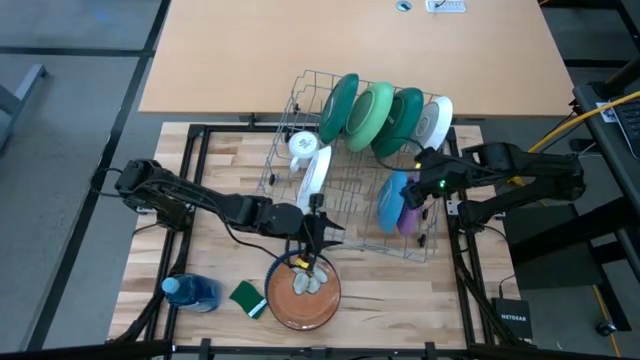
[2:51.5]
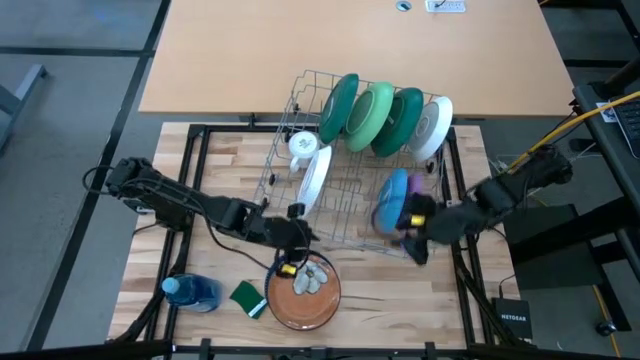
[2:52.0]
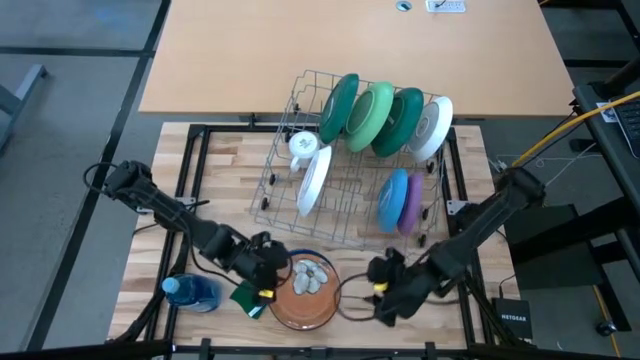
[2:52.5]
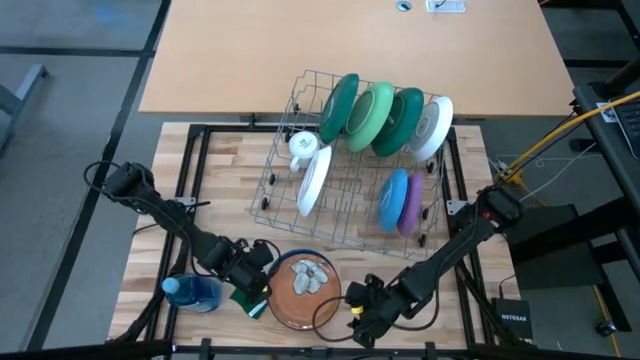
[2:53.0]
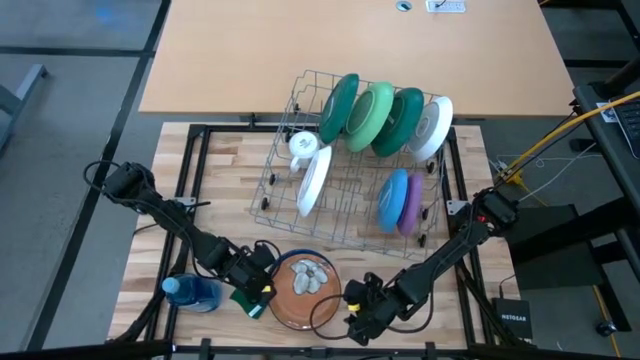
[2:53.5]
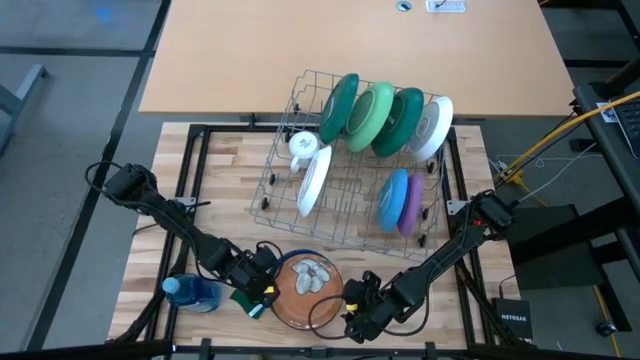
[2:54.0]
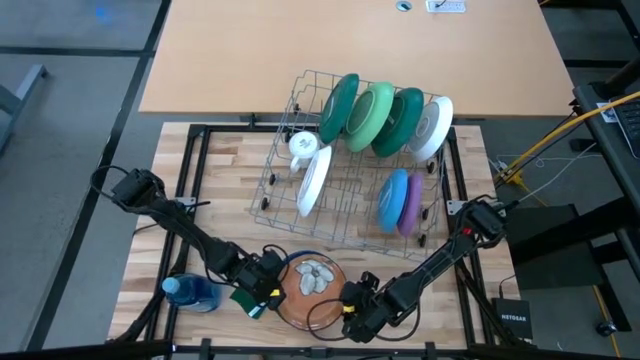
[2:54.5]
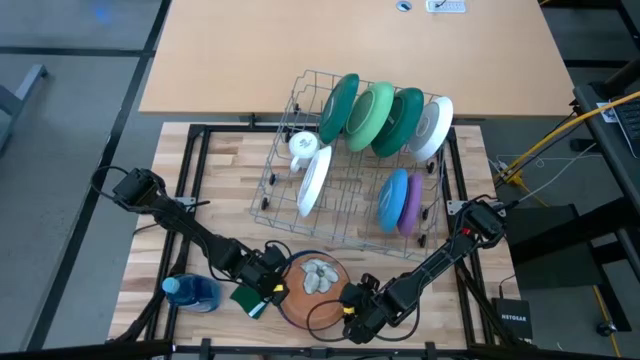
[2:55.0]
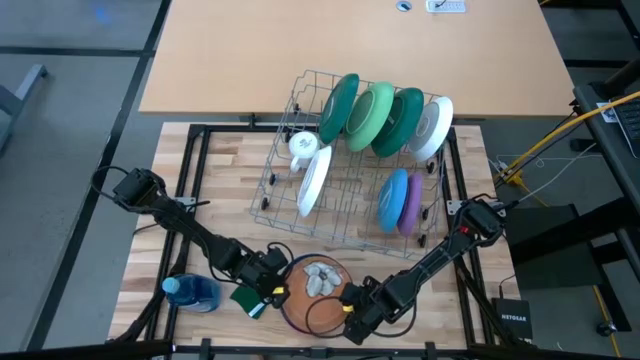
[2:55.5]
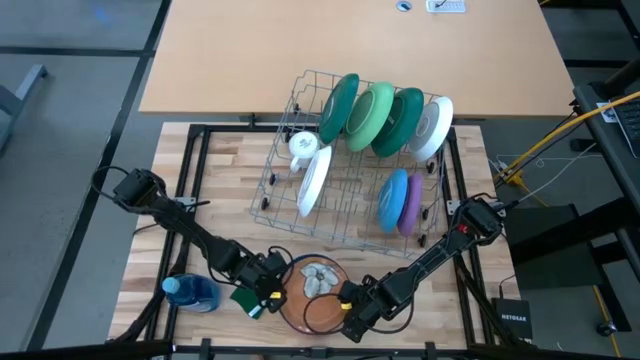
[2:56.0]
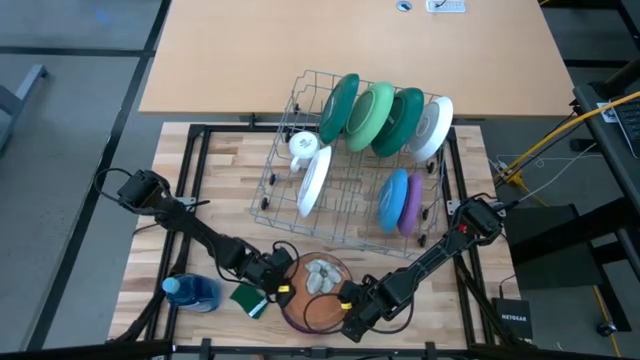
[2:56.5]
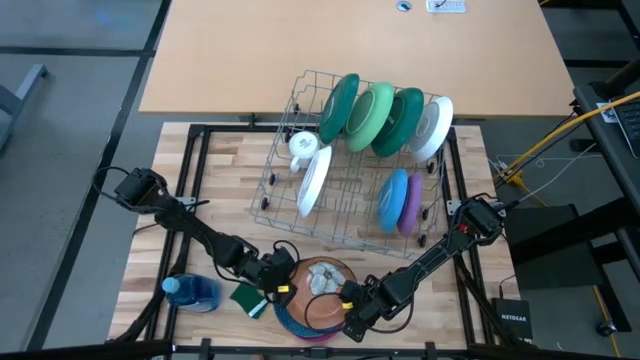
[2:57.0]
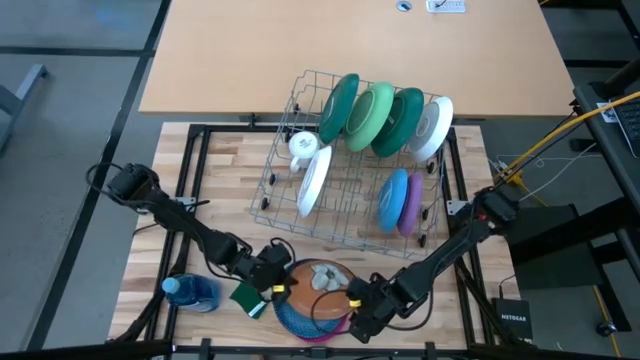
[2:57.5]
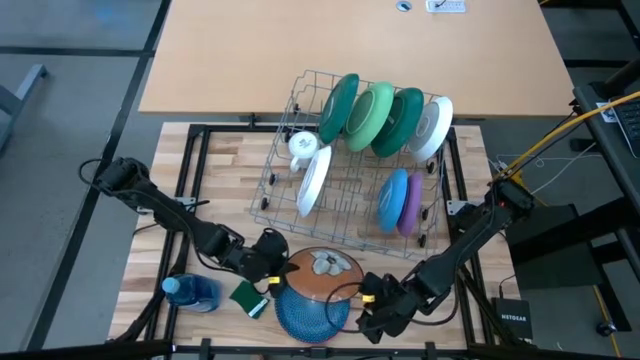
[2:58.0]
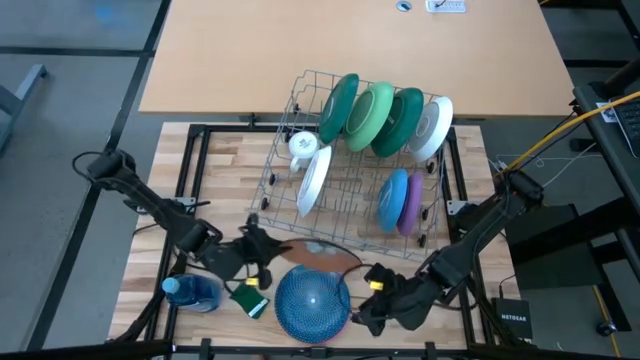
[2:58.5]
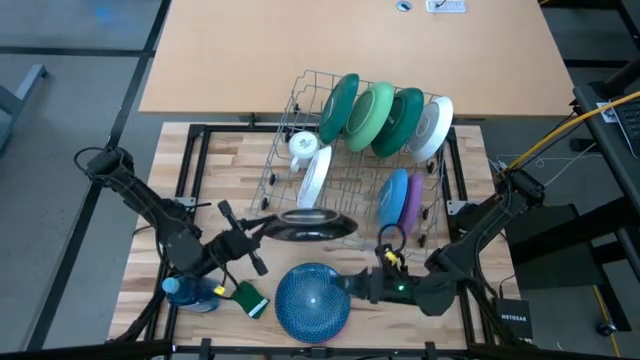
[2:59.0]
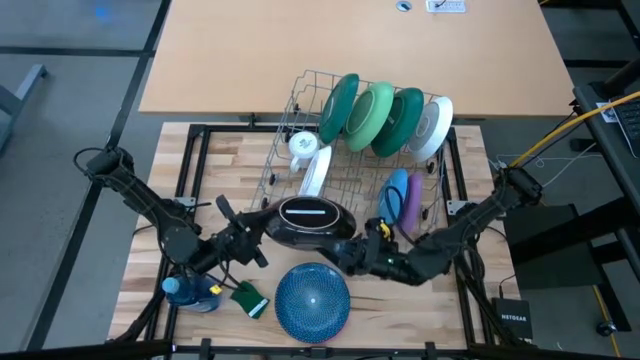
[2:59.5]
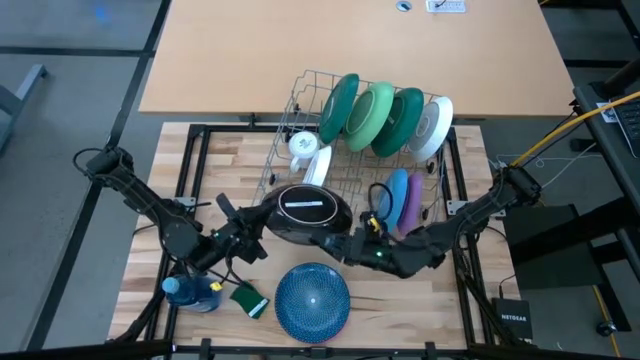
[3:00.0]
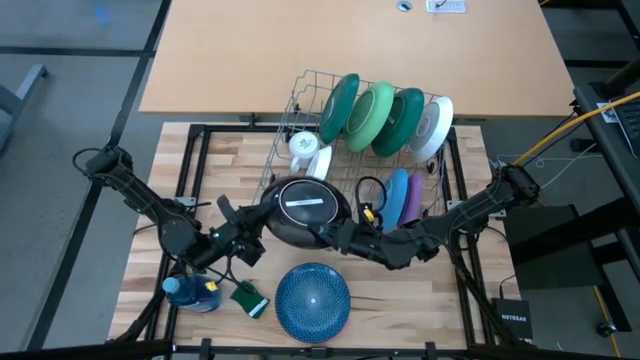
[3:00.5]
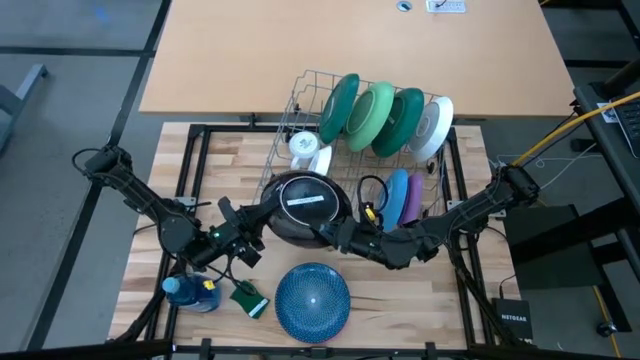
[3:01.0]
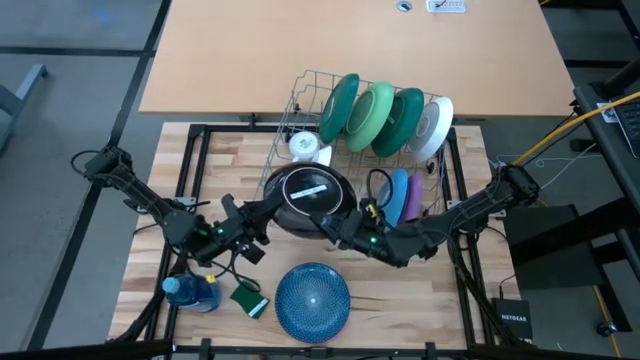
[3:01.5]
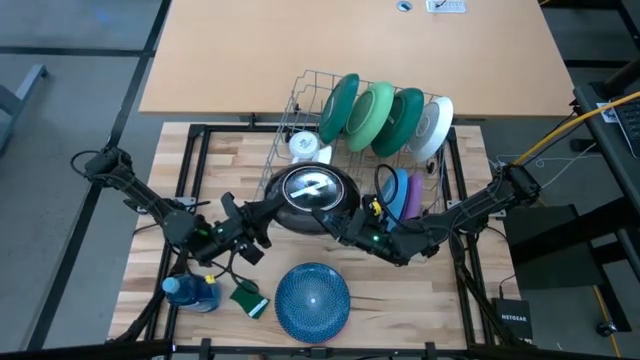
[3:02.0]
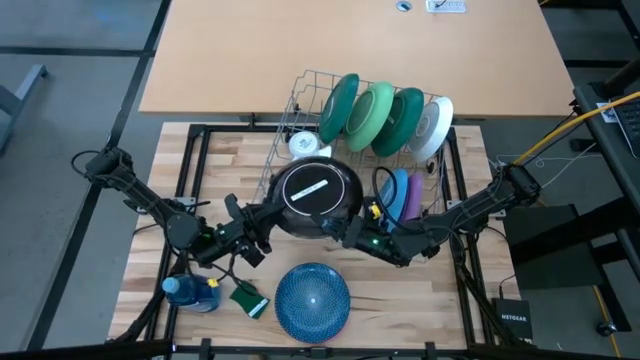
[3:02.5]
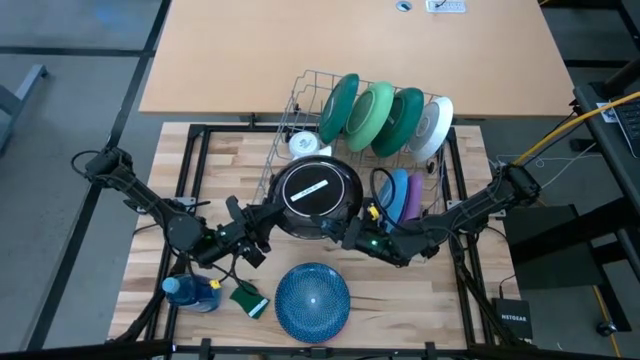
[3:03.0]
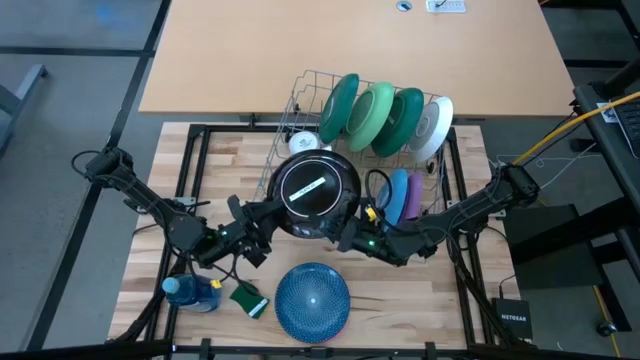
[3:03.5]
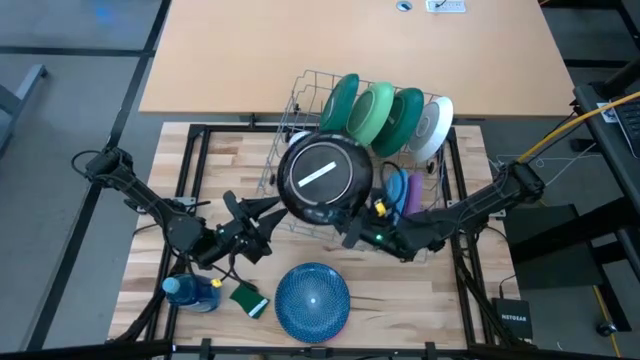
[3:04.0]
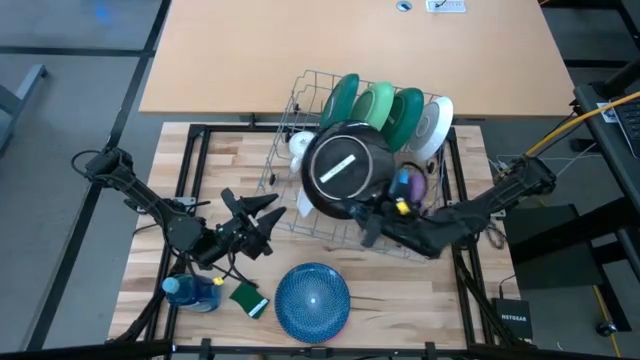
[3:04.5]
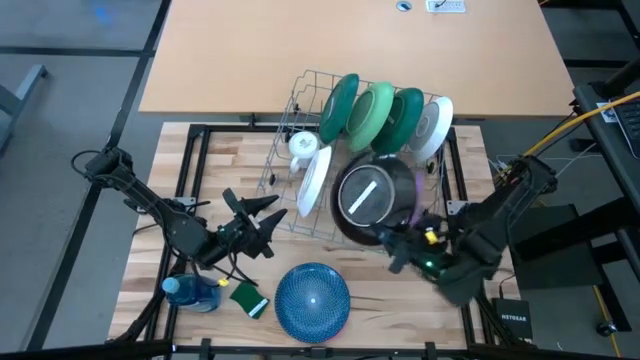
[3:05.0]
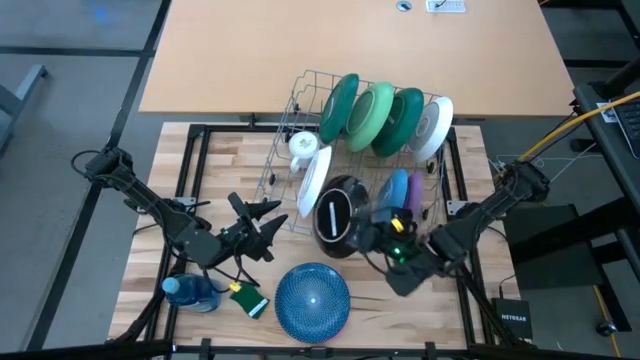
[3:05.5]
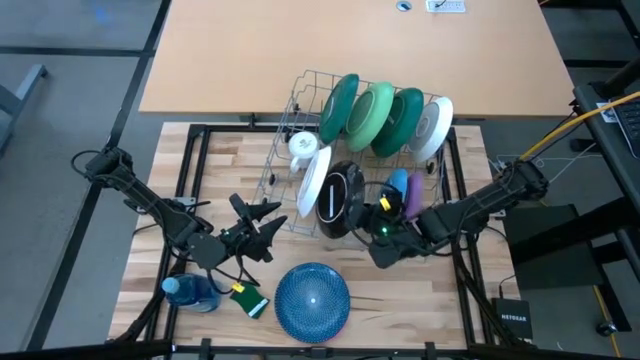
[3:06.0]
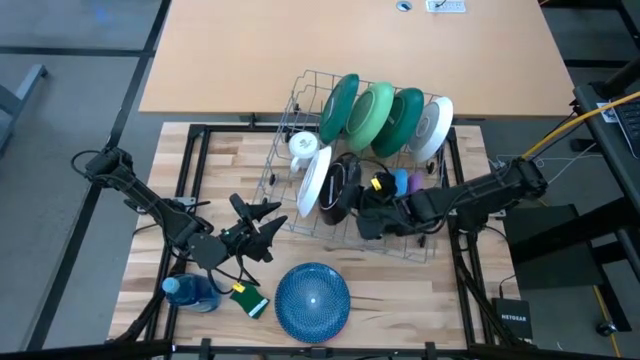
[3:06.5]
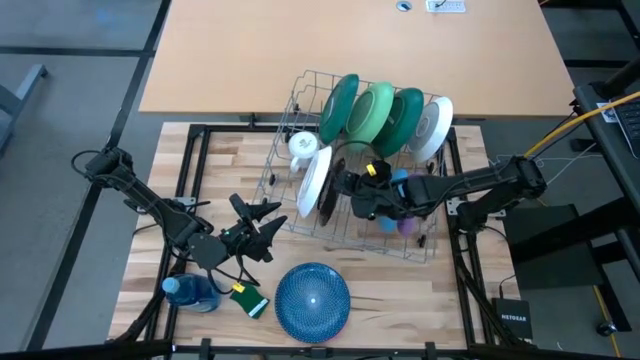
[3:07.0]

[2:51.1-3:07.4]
Task: Sort dishes
Put the orange plate in the dish rack

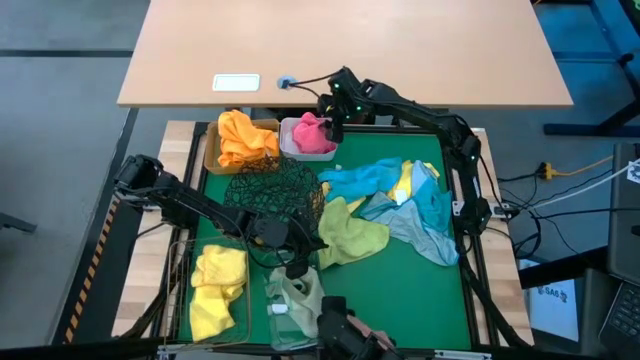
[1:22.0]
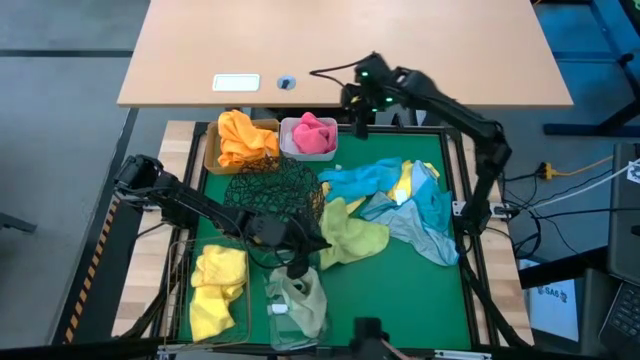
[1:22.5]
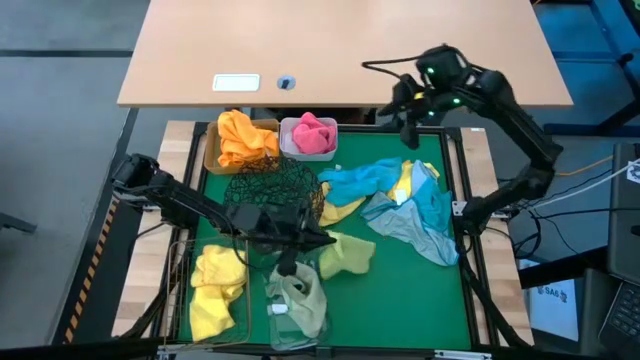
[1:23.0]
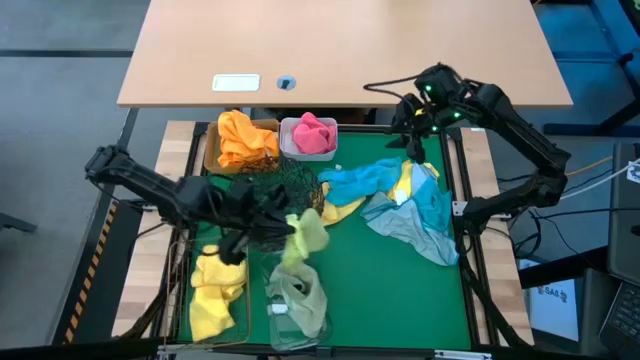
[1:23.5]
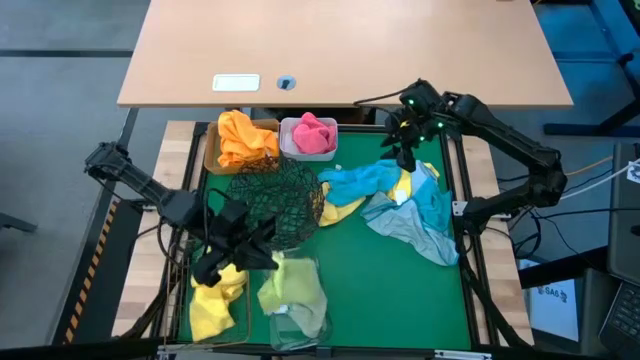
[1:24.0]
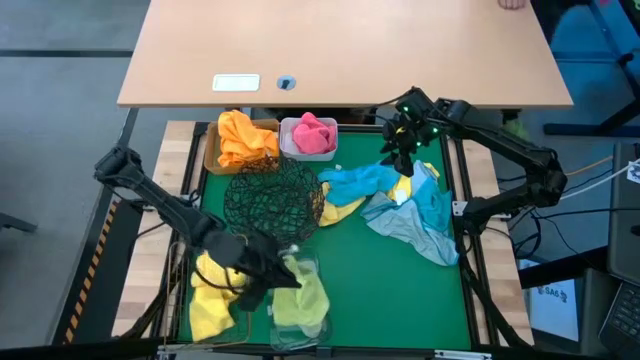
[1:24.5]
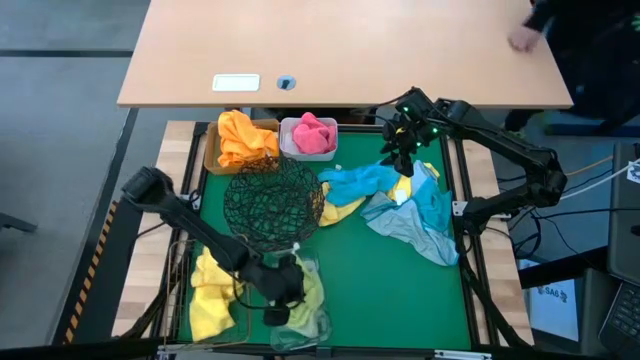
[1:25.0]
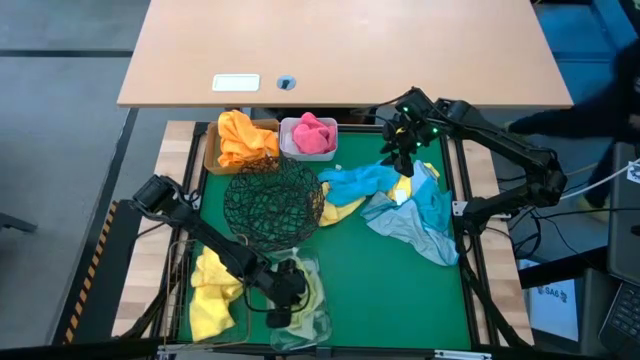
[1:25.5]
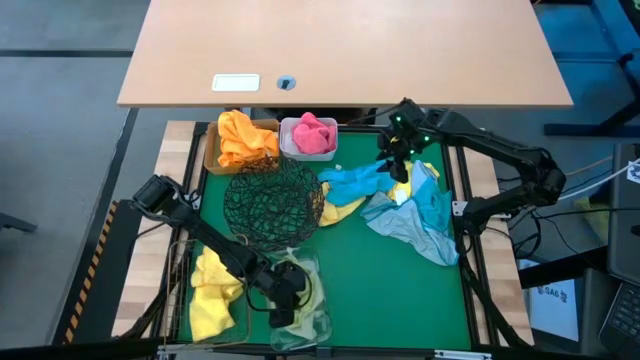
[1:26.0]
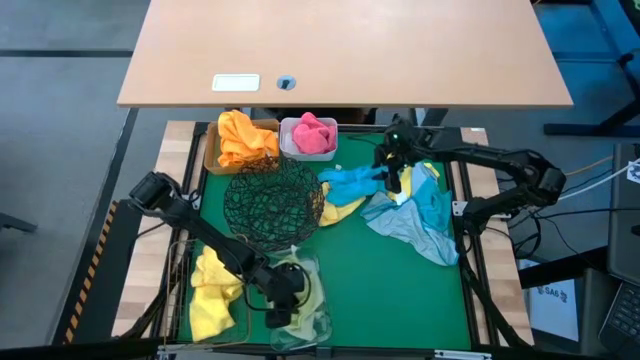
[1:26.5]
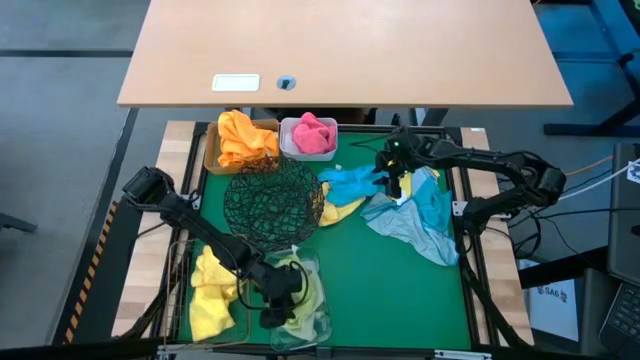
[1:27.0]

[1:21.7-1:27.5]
Task: Sort microfiber towel by color & place in baskets
Put the light green microfiber towel into the transparent bin
